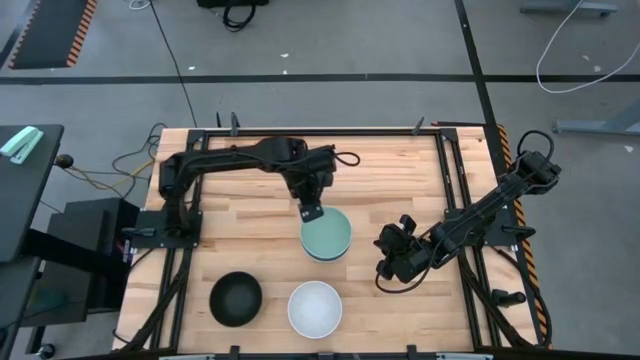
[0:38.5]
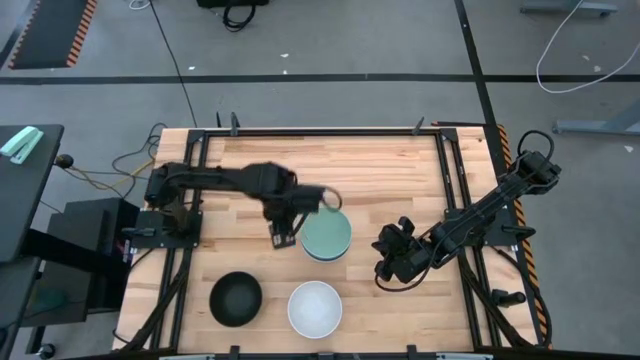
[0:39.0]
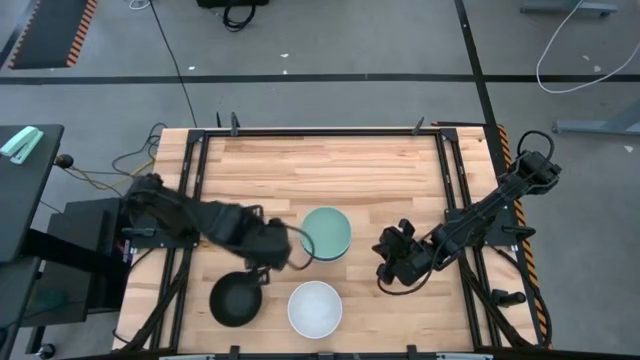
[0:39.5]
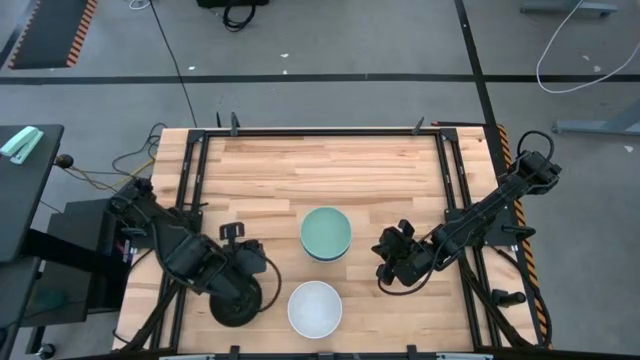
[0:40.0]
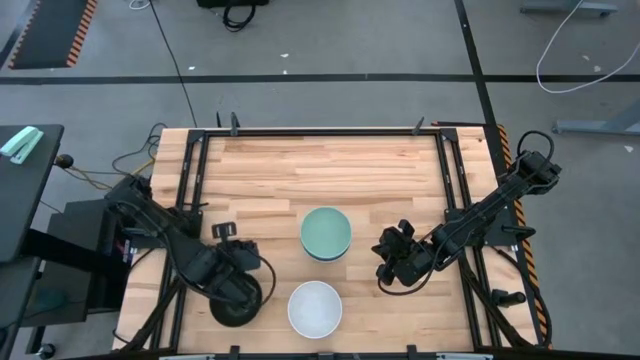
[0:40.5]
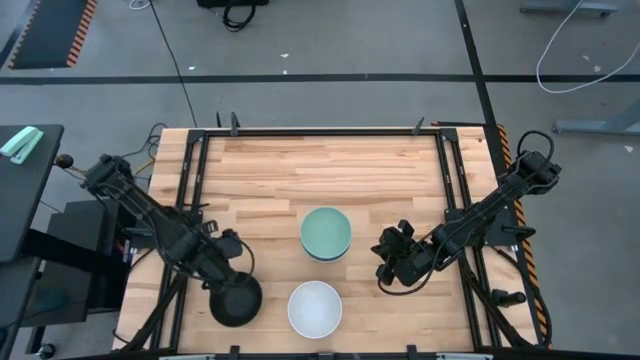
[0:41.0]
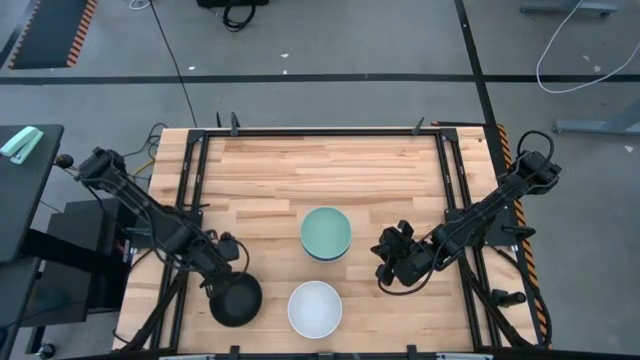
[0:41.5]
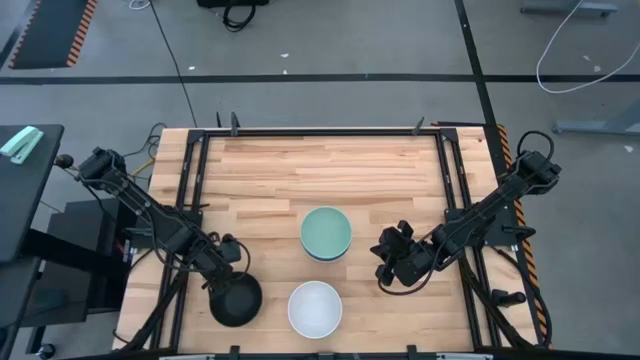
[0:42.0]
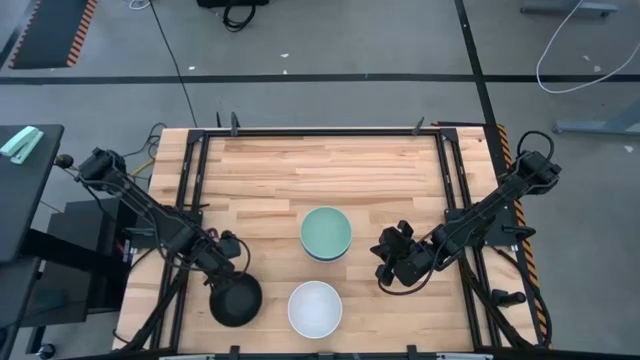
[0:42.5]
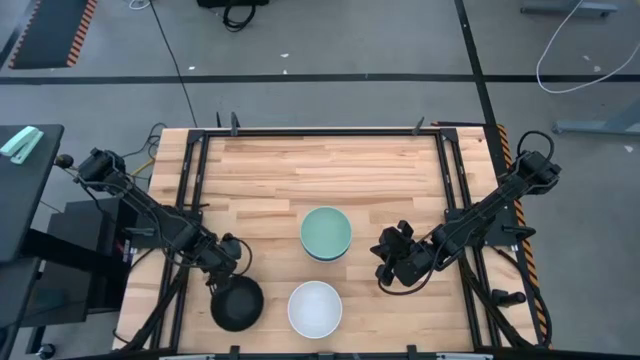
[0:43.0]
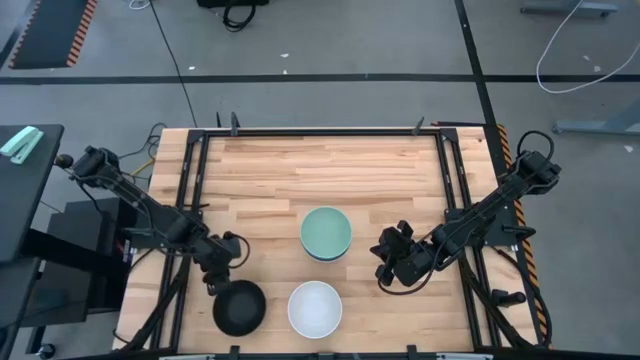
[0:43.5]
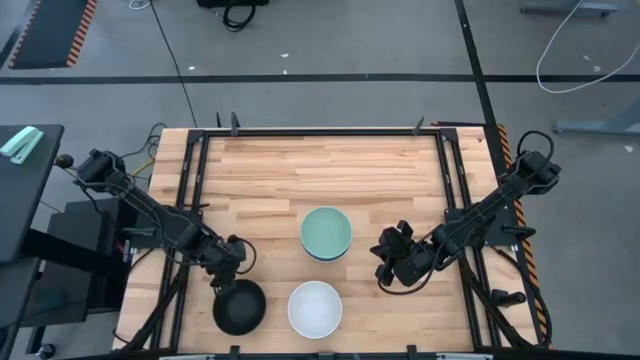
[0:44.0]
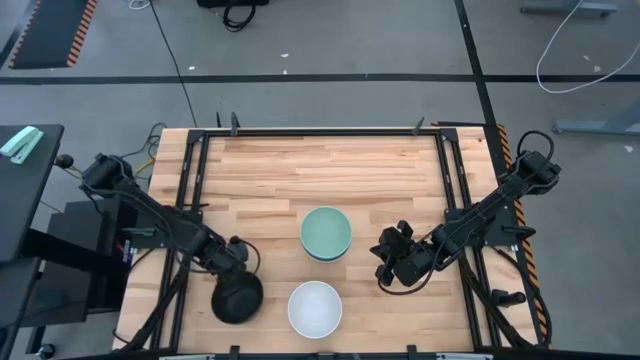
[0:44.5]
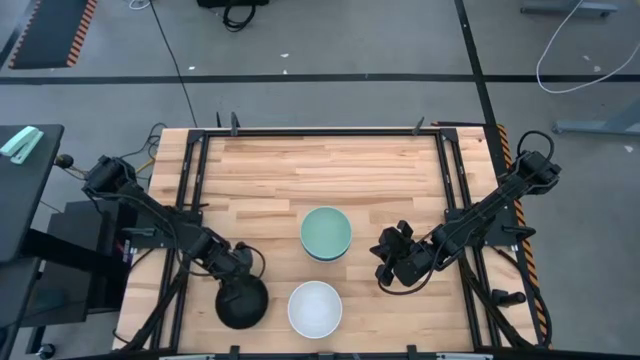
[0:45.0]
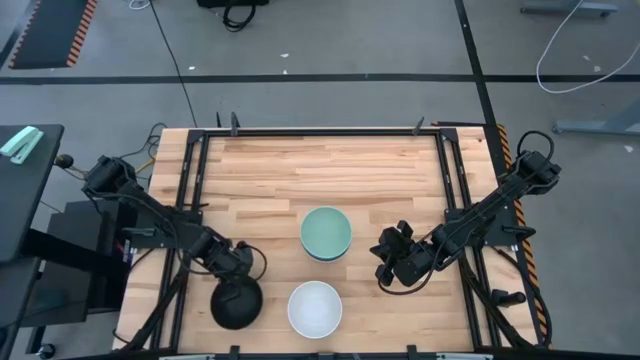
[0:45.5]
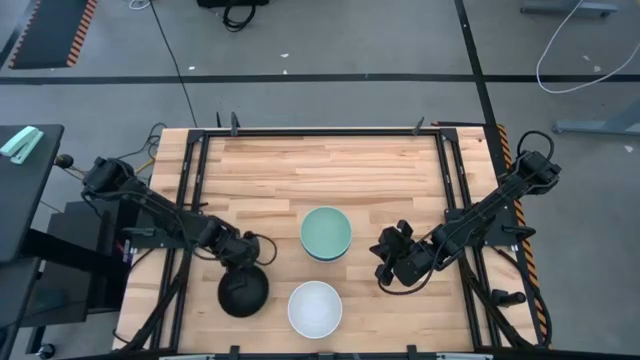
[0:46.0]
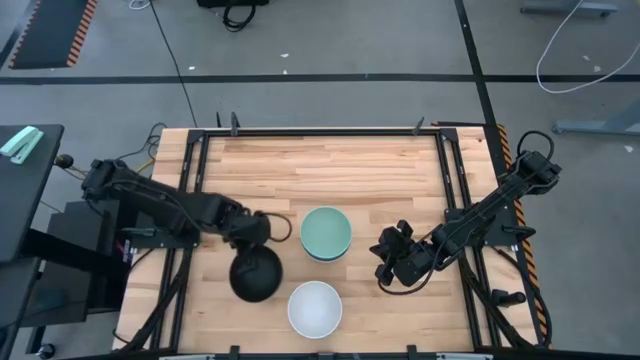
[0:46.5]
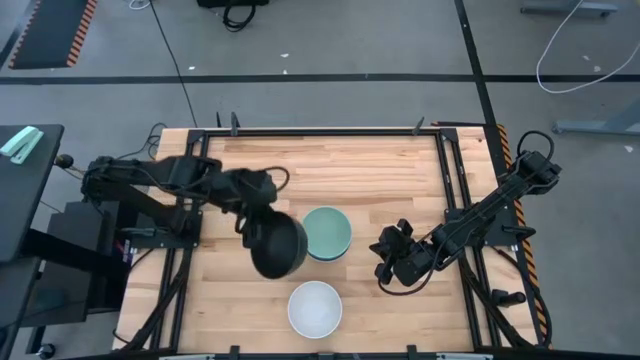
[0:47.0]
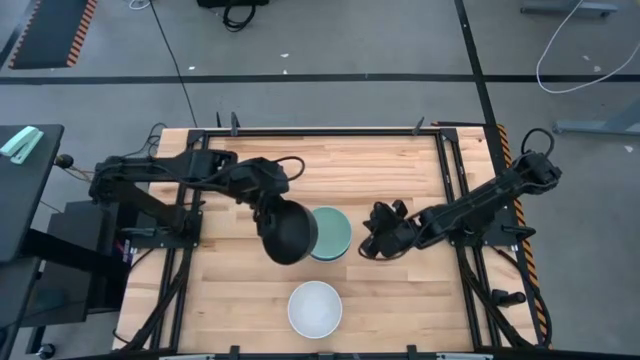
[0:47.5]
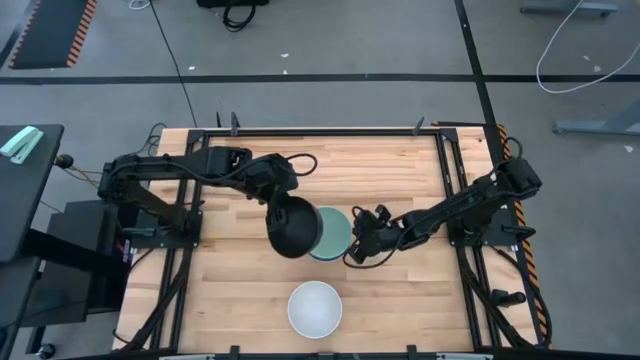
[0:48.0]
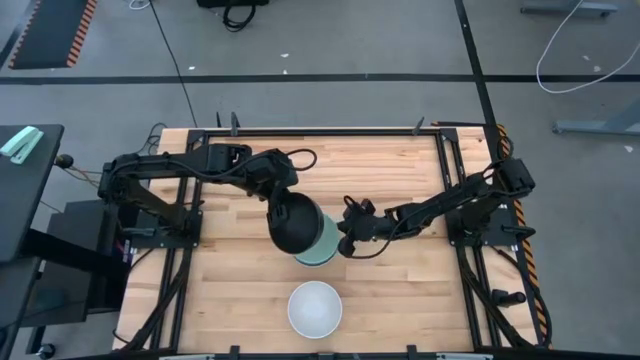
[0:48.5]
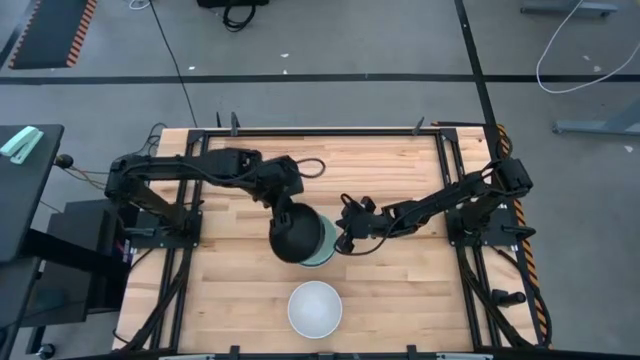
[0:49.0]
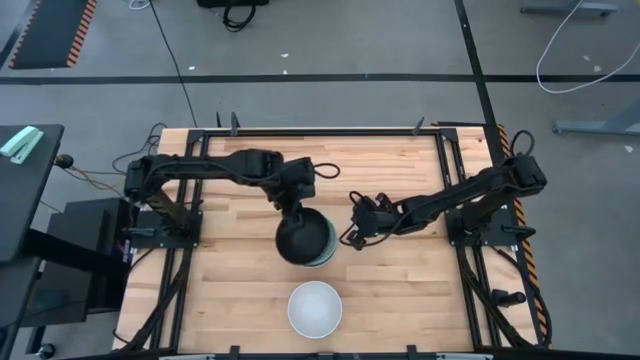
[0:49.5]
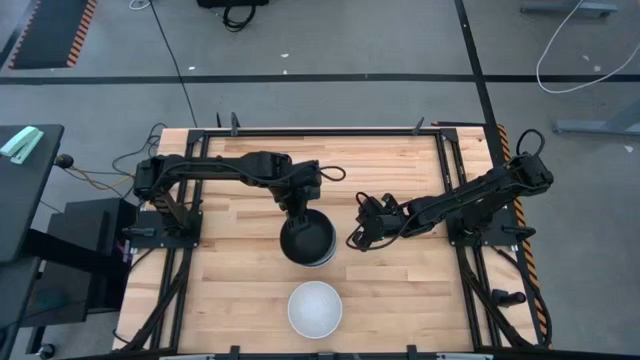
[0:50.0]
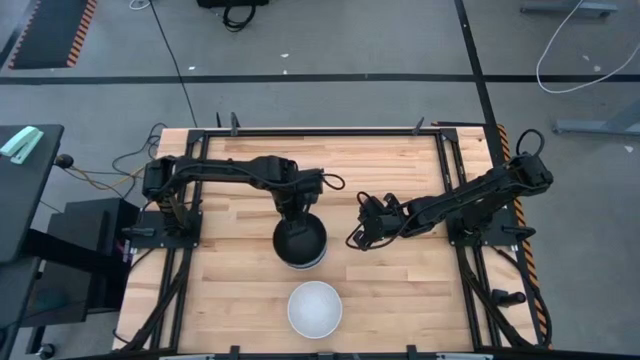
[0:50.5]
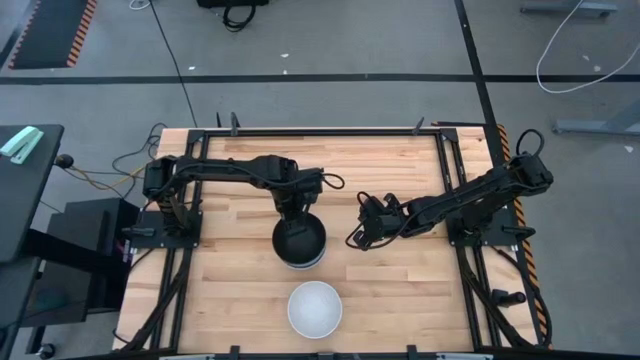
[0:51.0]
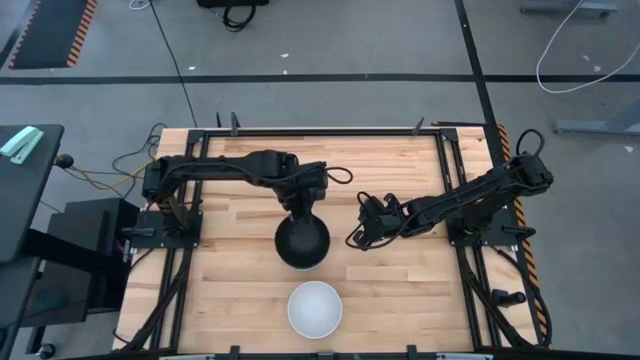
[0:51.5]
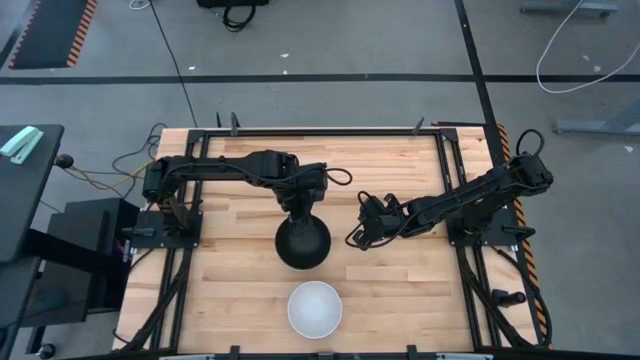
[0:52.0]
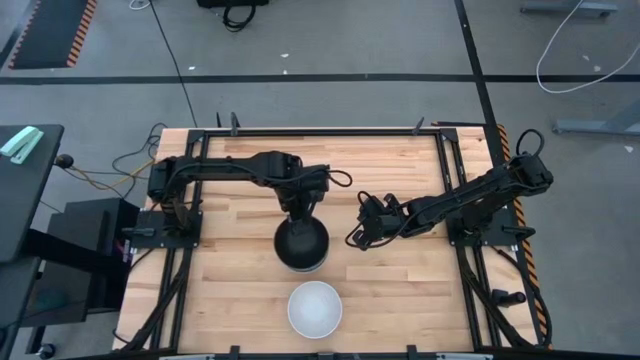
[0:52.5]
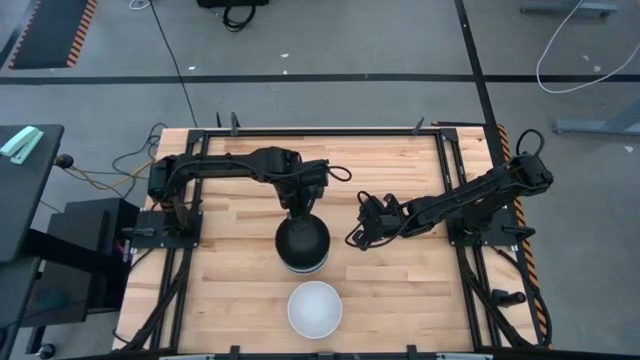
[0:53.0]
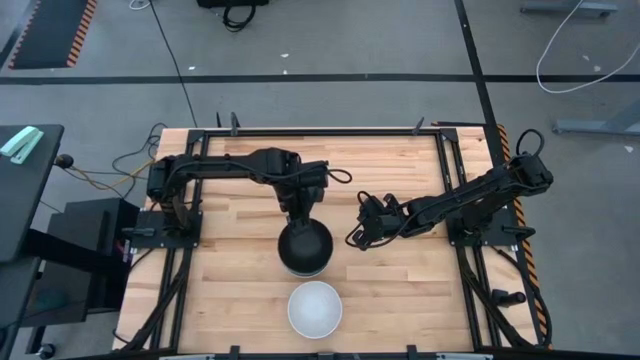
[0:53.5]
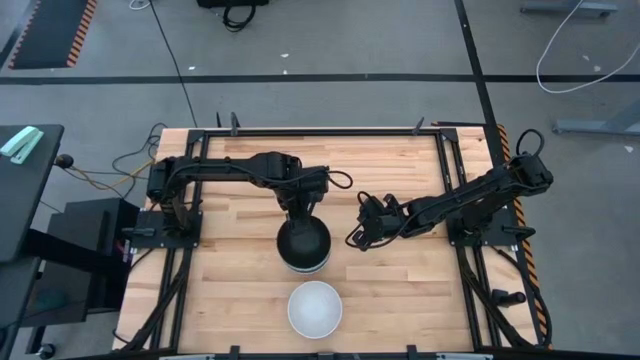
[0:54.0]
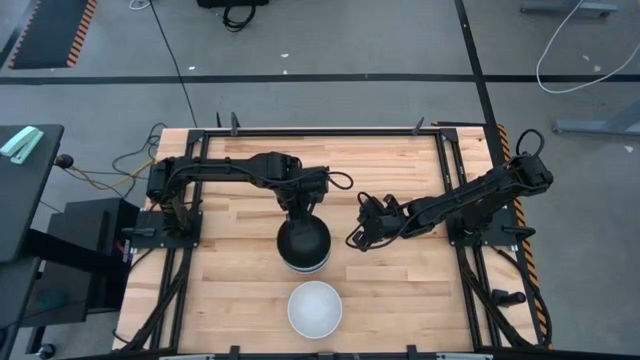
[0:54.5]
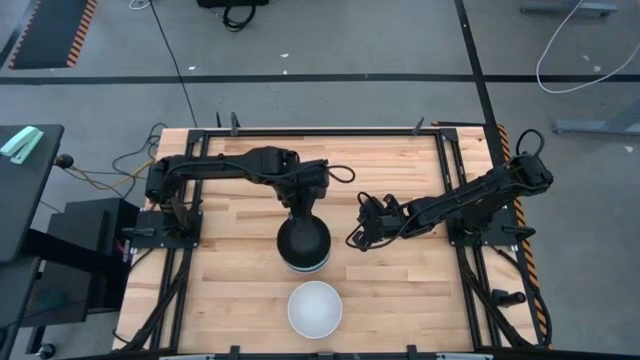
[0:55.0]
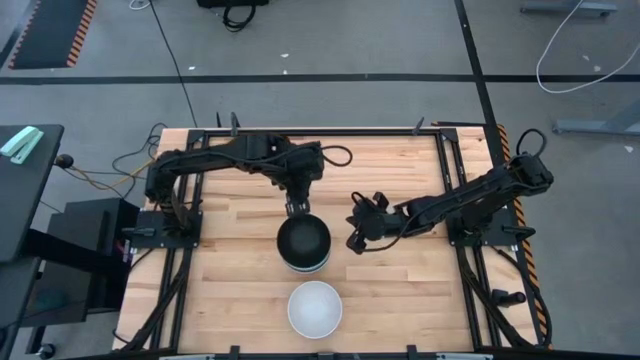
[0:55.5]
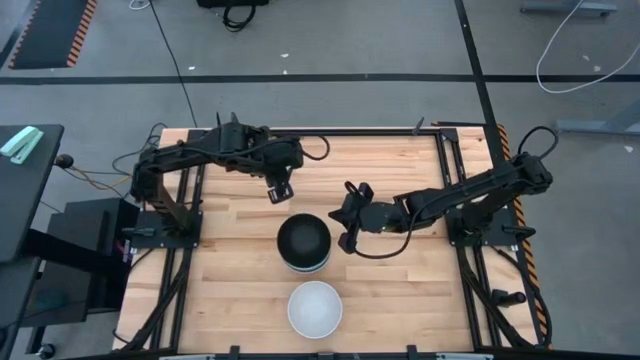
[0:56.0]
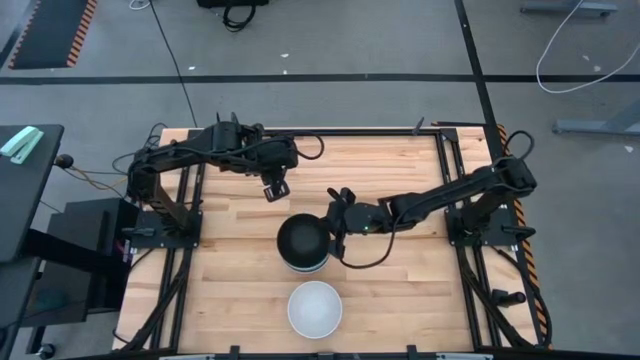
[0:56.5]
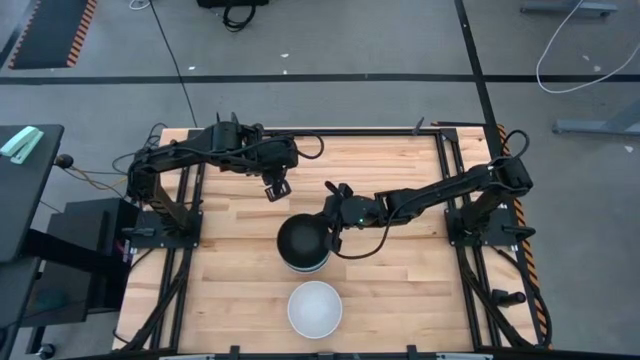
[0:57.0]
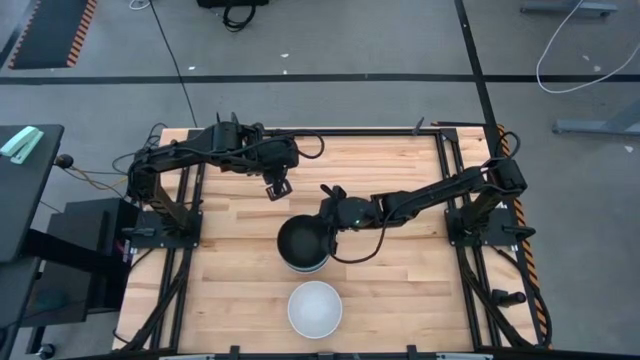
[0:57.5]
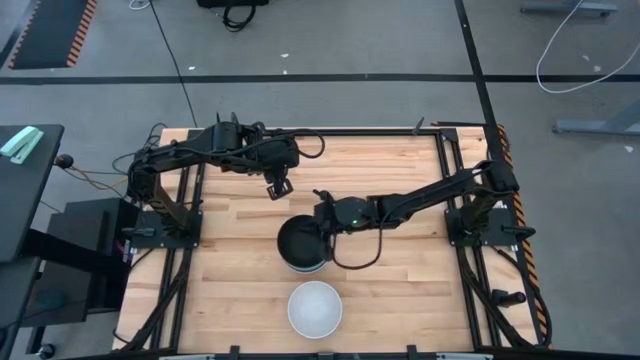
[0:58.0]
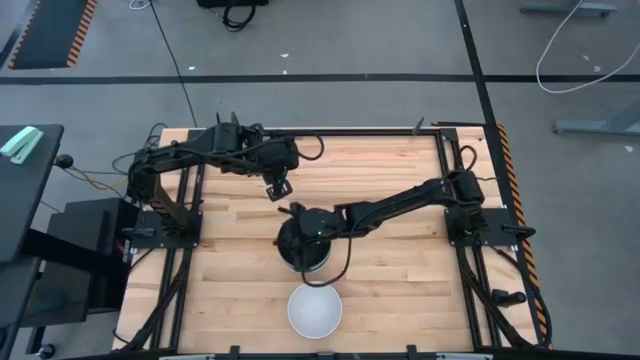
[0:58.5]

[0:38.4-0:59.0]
Task: Nest bowls inside each other
Stack the black bowl on top of the light green bowl

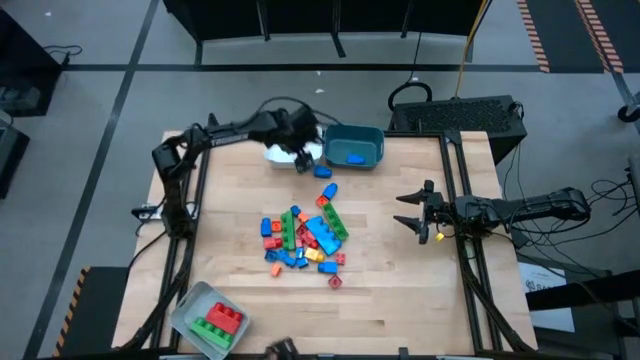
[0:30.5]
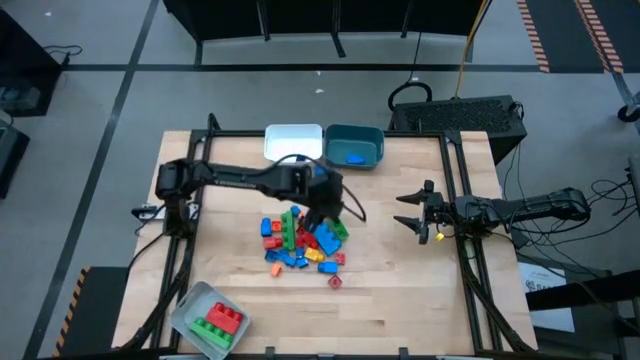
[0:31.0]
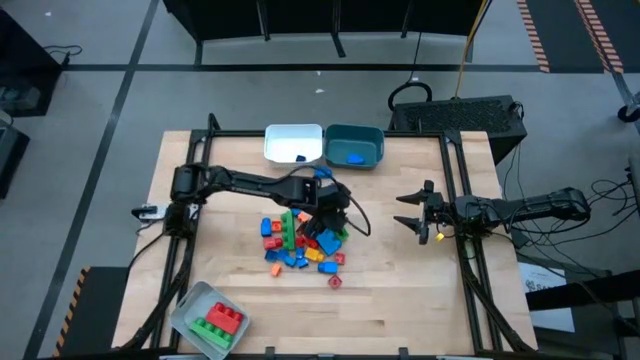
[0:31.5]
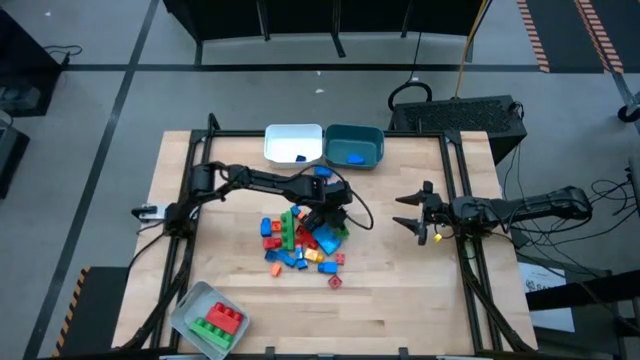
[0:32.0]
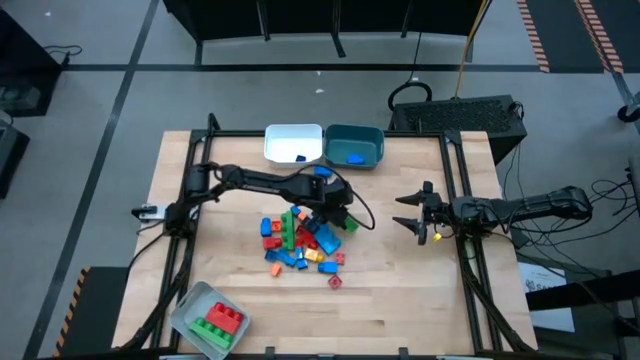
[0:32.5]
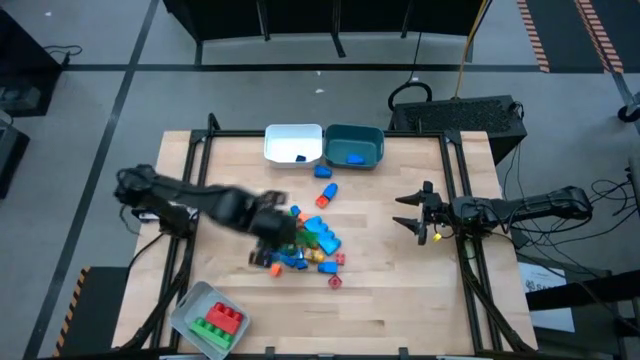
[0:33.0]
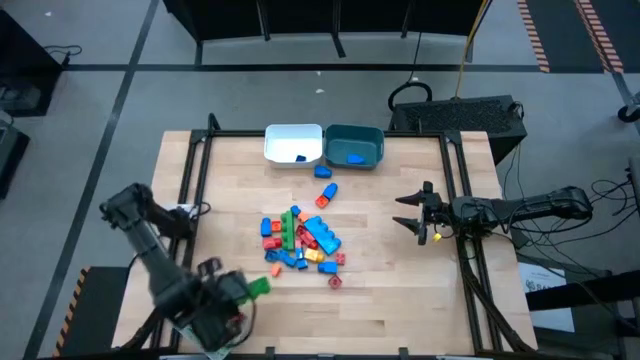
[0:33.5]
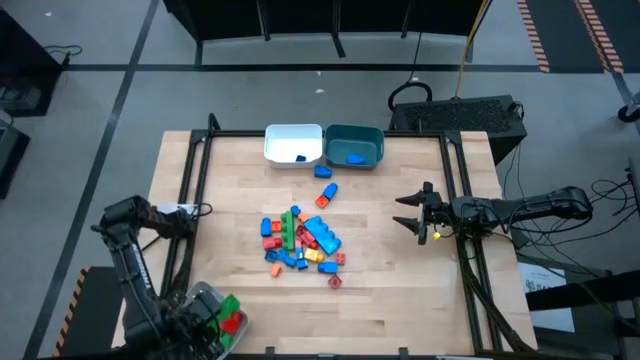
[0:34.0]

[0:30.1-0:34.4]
Task: Sort blocks by size
Put the green rectangular 4 stud game piece into the gray bin
